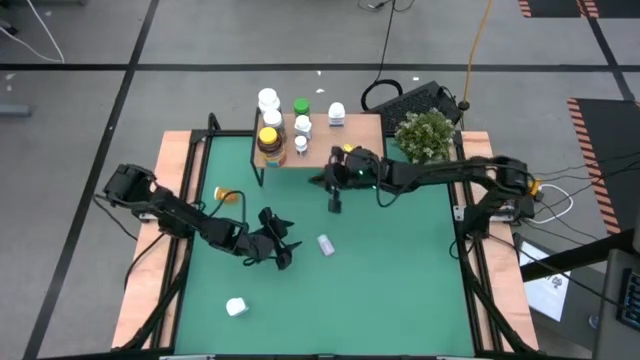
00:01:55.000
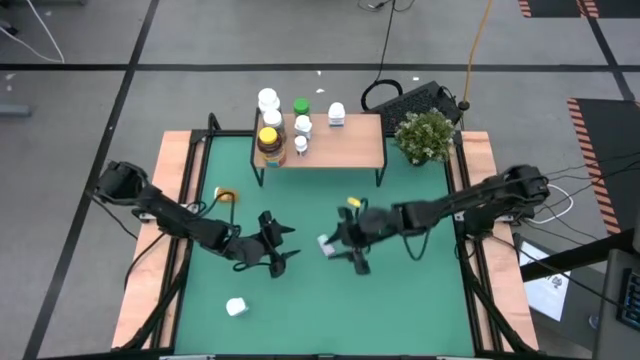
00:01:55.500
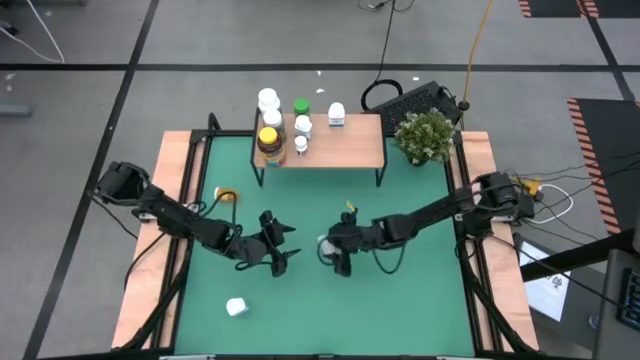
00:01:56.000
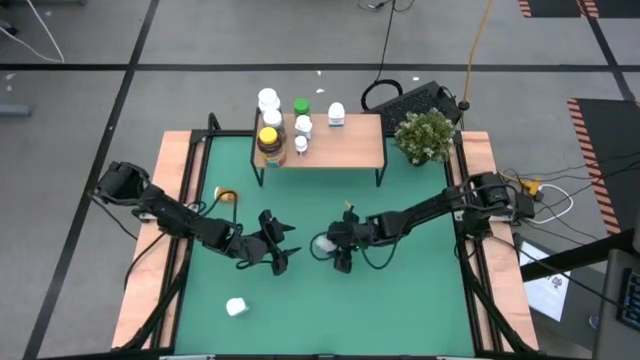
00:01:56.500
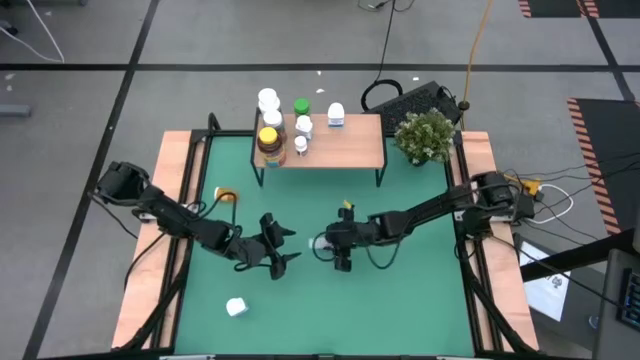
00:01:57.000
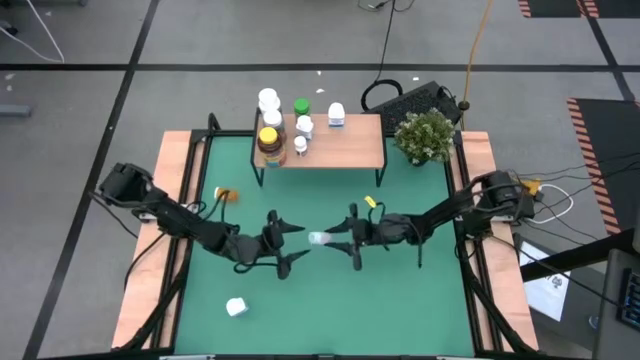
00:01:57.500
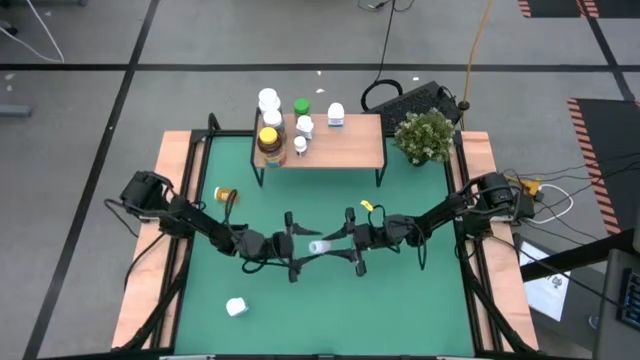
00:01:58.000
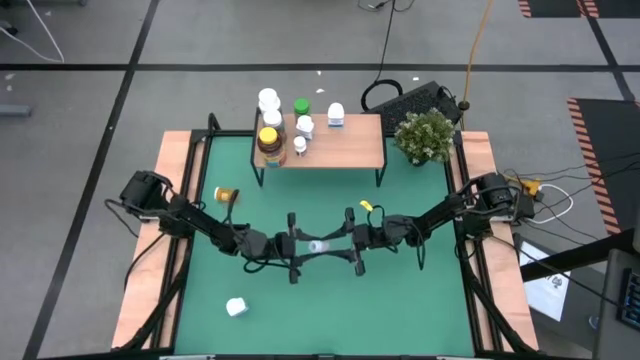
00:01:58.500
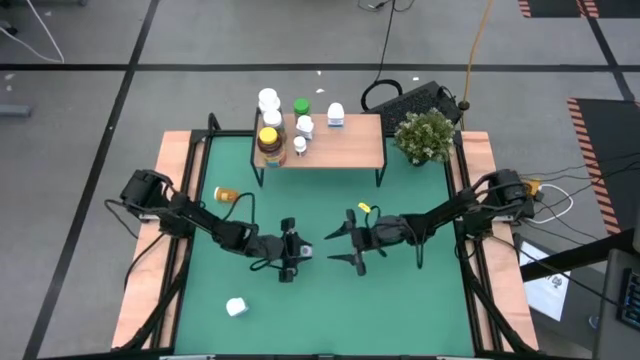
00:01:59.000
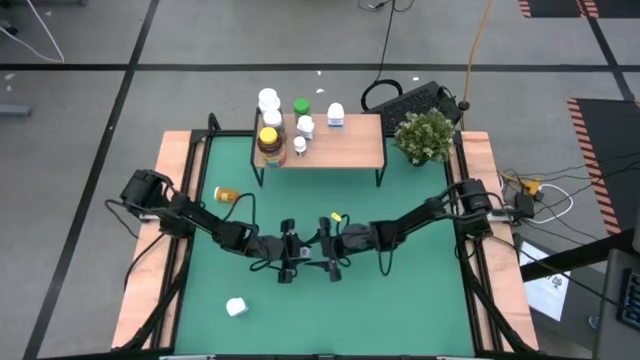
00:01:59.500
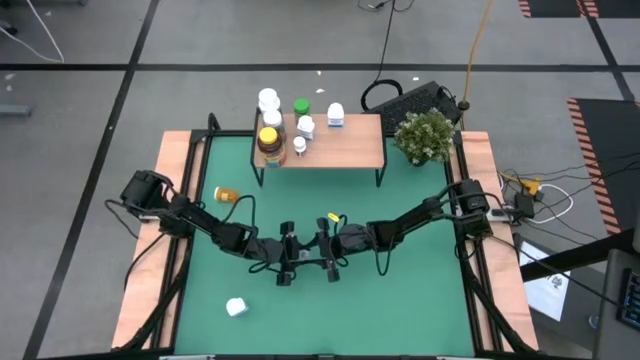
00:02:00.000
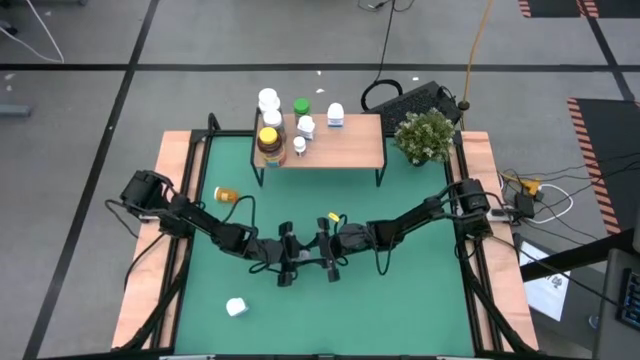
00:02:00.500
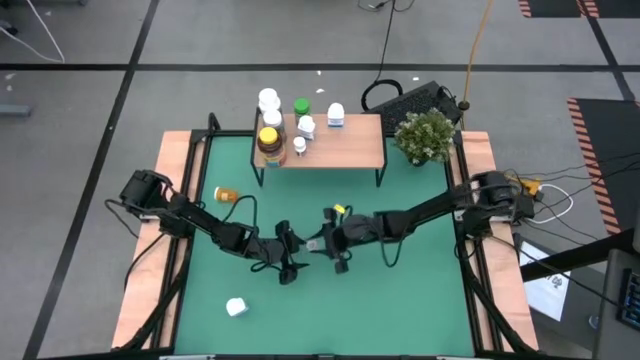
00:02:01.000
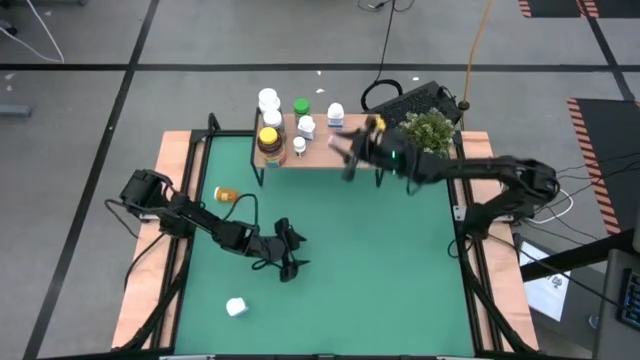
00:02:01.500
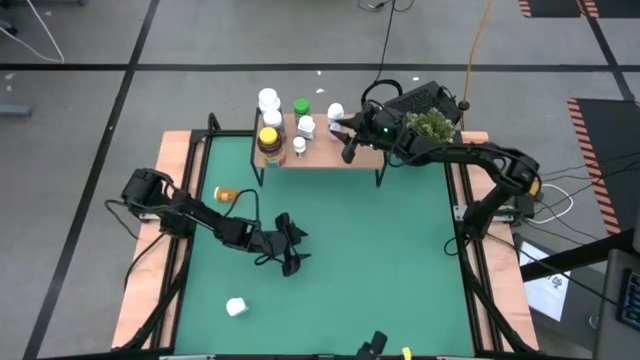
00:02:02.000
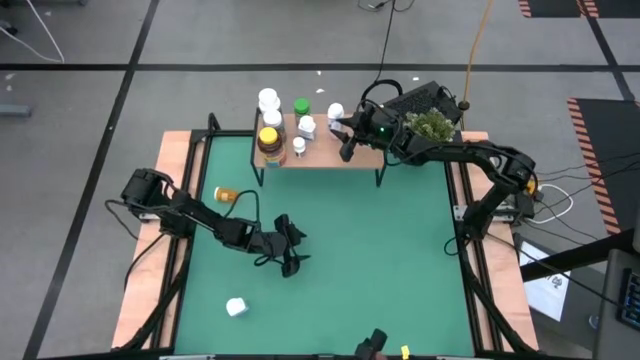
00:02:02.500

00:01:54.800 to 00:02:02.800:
Task: Pick and place medicine bottles onto shelf by color
Put the transparent pill bottle on the shelf

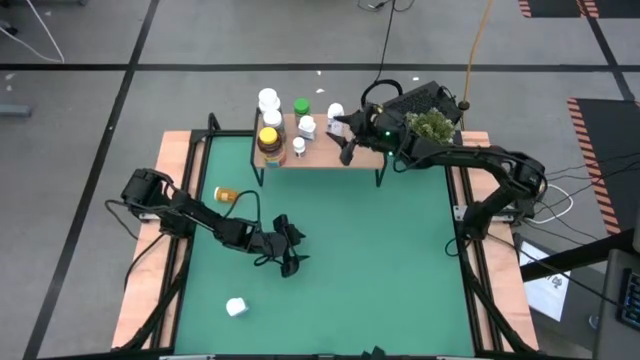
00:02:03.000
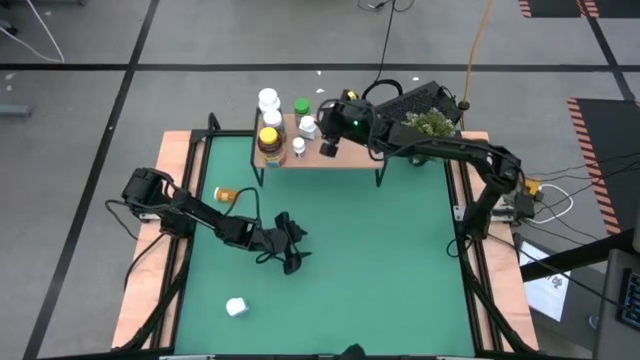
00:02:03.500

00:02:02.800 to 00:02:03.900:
Adjust the white and blue pill bottle on the shelf

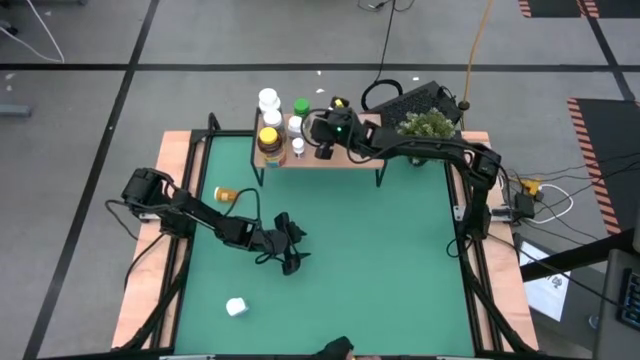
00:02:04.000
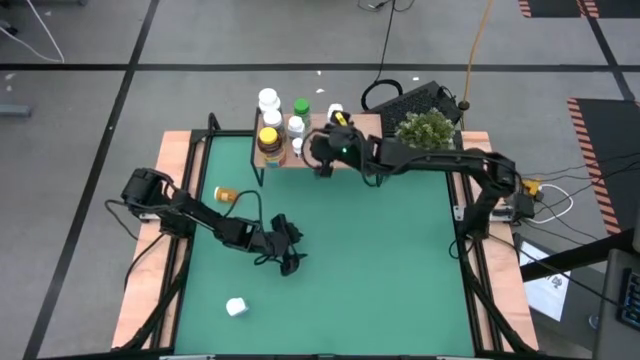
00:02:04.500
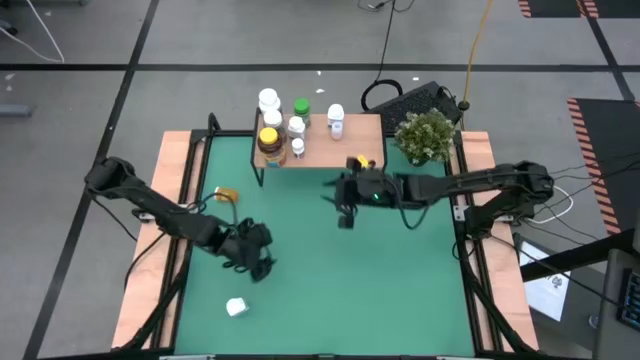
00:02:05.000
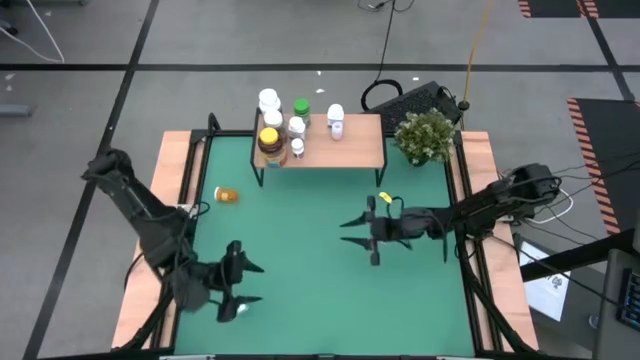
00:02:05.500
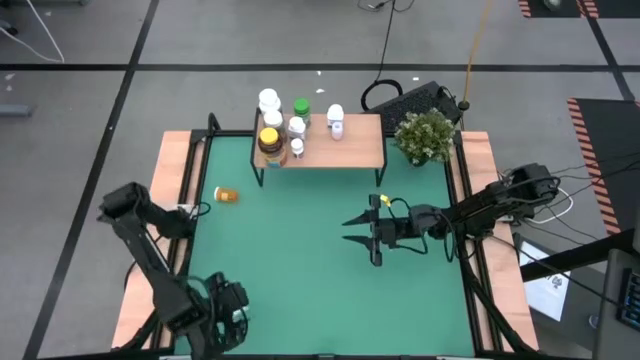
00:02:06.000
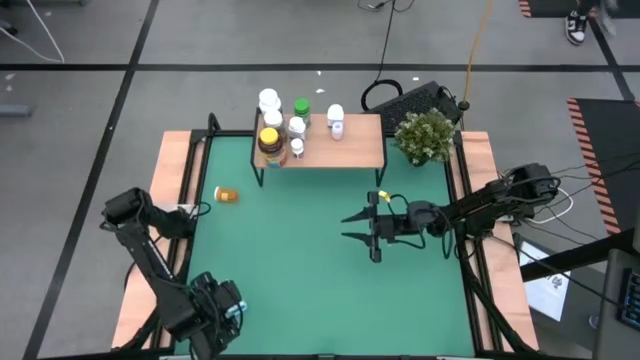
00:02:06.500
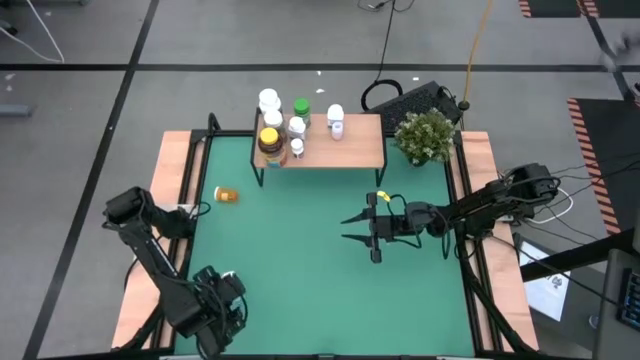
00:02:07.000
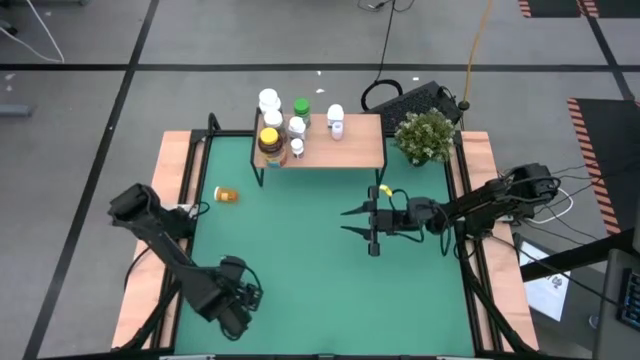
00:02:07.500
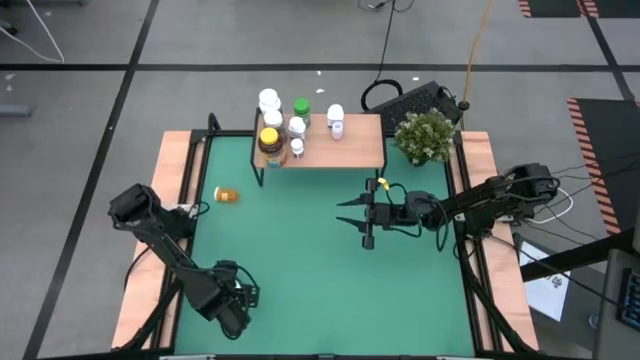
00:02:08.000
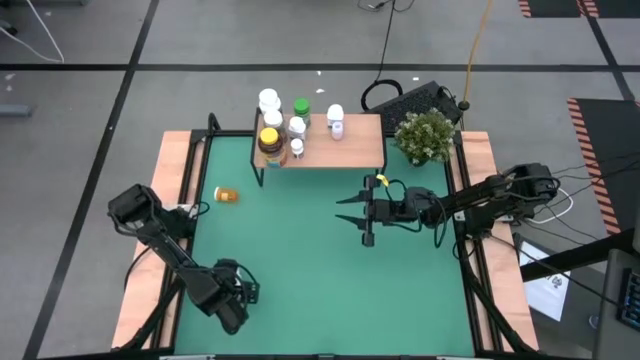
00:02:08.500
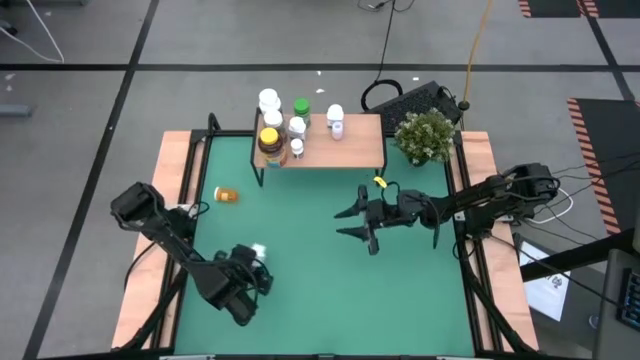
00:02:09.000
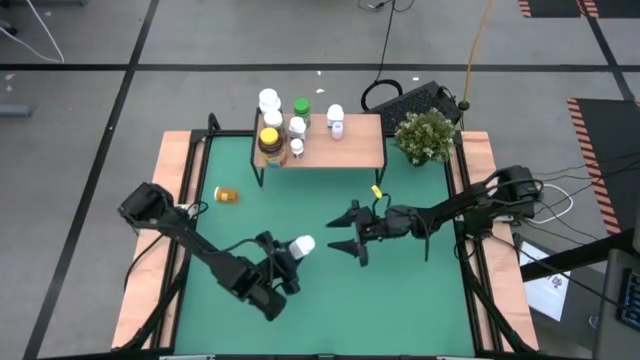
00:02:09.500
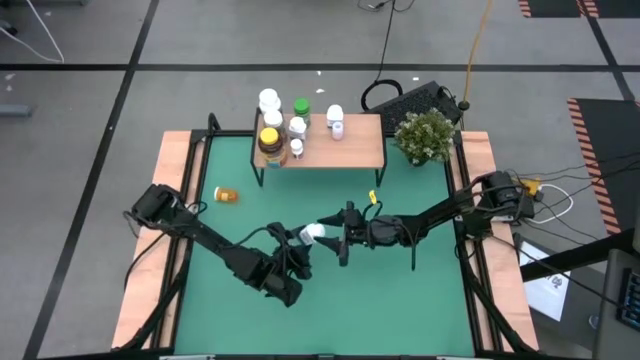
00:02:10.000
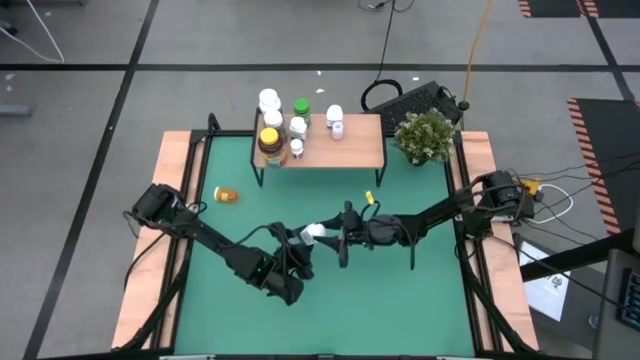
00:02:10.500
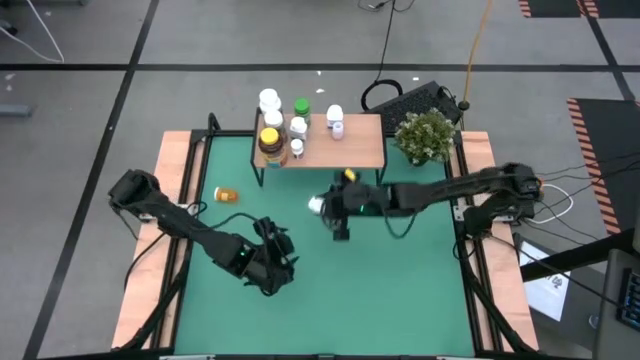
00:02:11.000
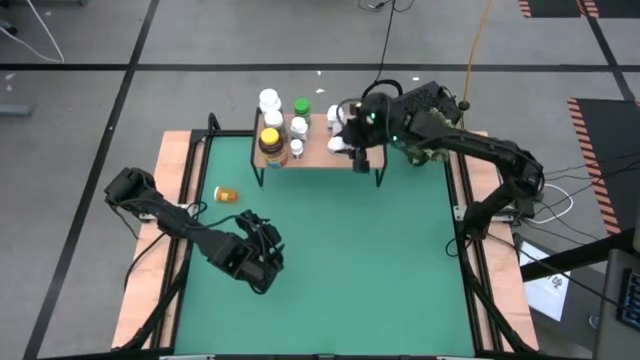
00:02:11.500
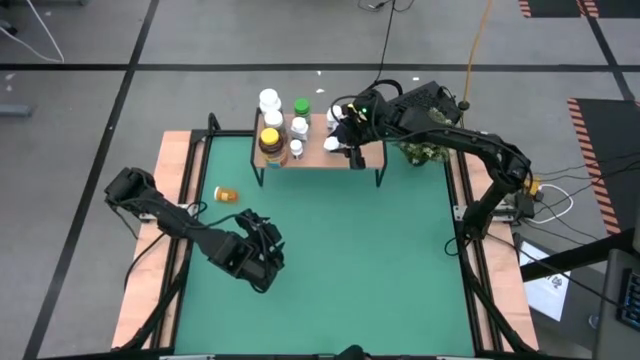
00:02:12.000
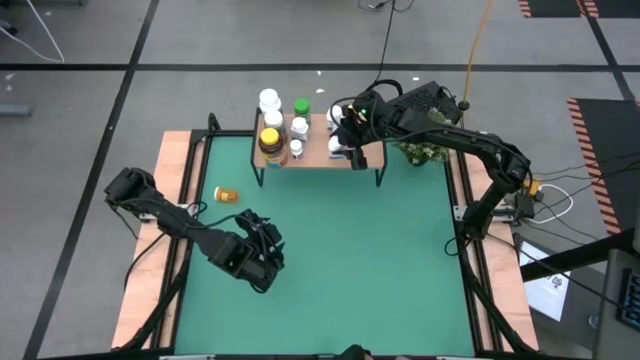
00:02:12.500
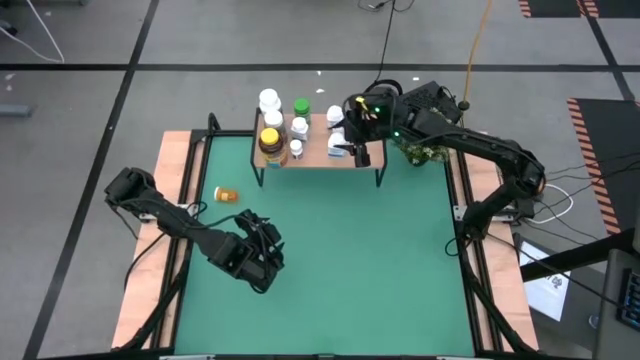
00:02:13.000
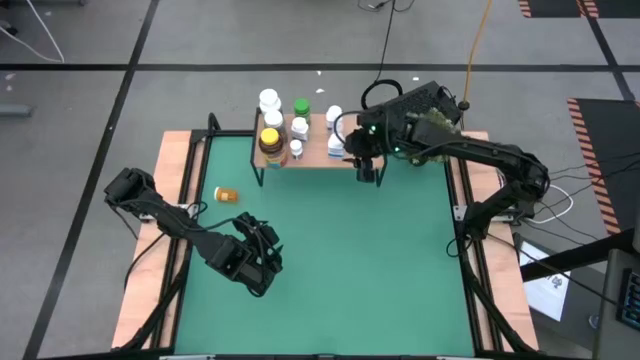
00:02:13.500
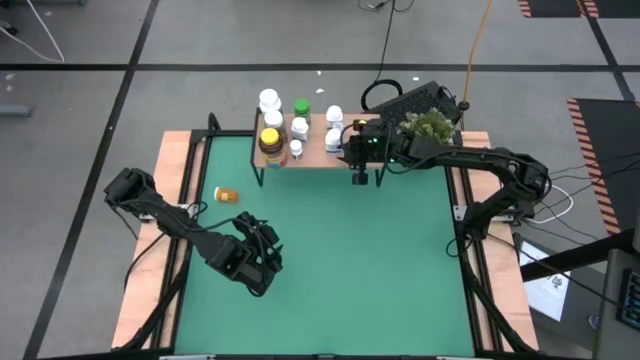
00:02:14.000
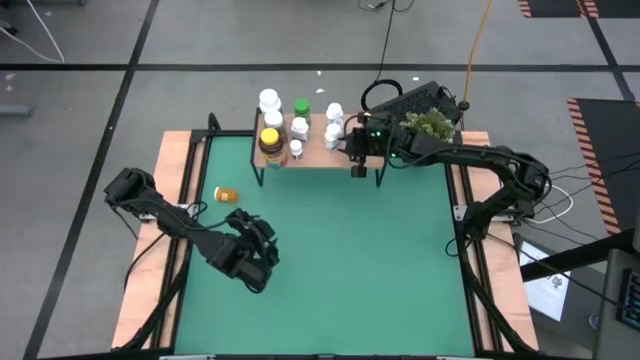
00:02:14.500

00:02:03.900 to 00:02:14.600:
Put the white and blue pill bottle on the shelf

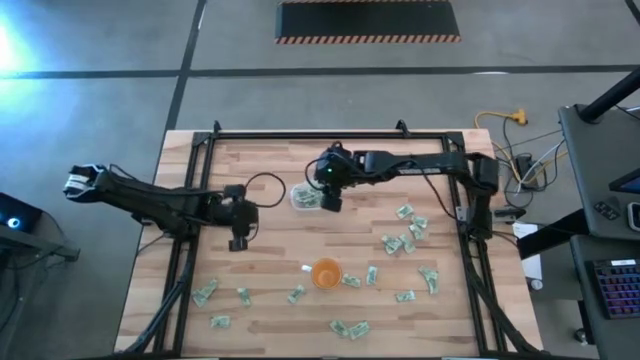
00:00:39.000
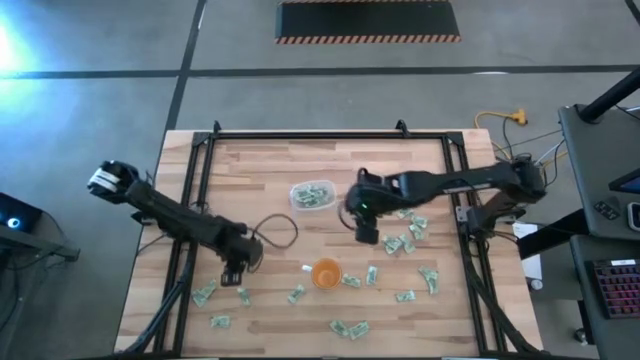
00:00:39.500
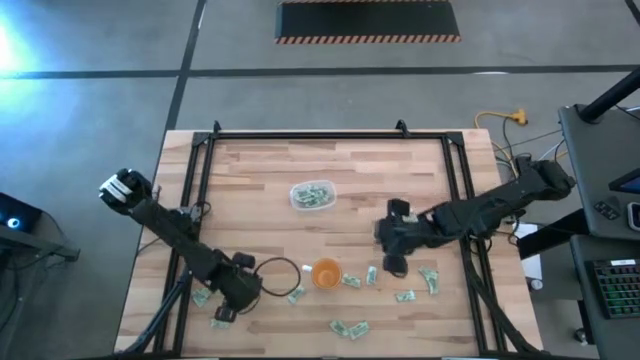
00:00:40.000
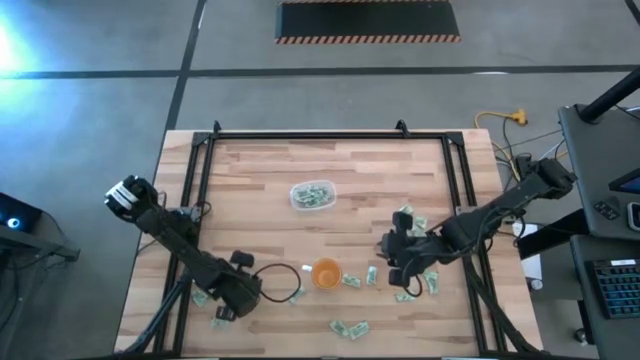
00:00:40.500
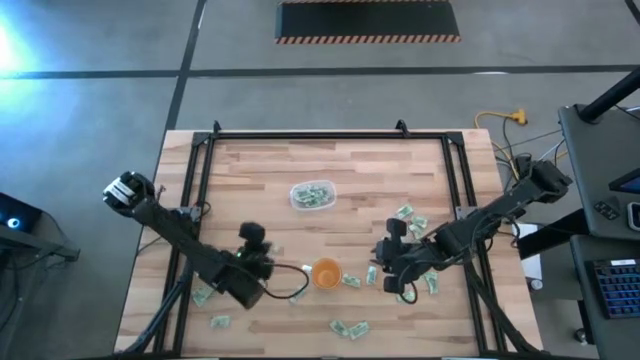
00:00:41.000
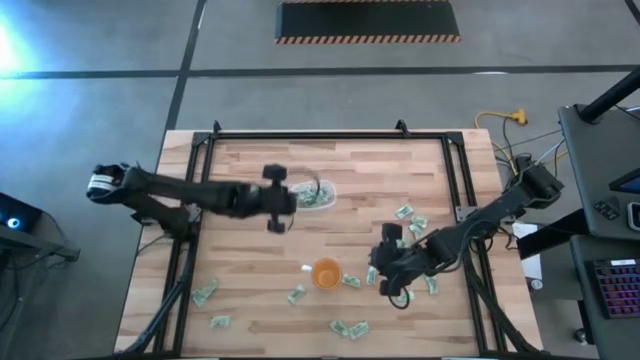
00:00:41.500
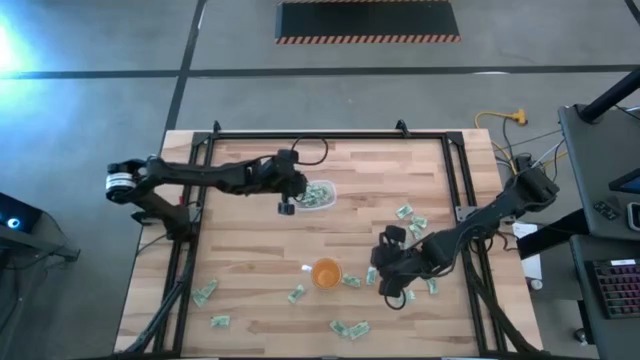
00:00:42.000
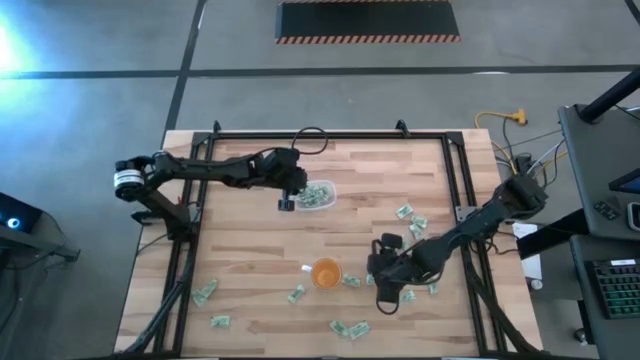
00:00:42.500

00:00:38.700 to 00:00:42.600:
Task: Pick and place Stevia / Truvia into bins
Put the stevia packet into the transparent bin
